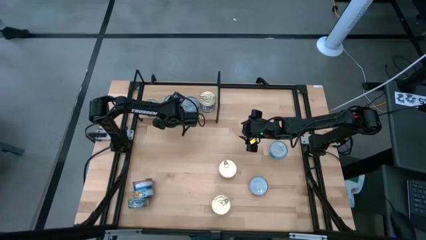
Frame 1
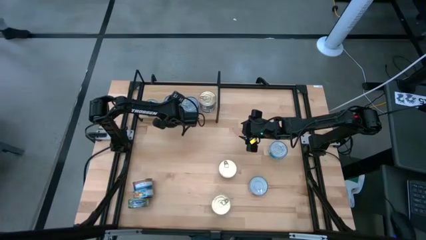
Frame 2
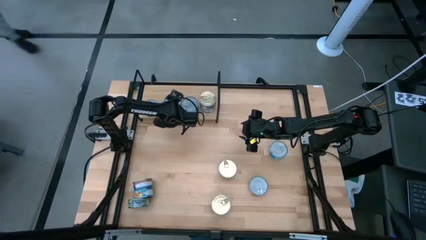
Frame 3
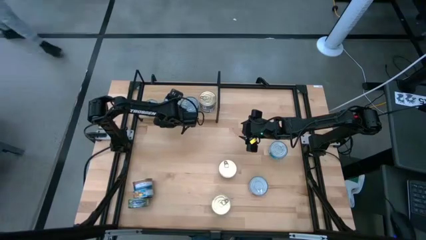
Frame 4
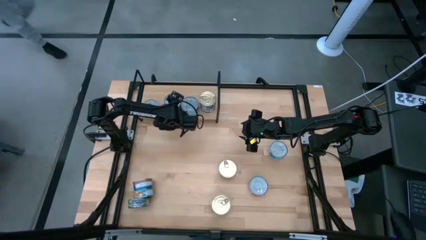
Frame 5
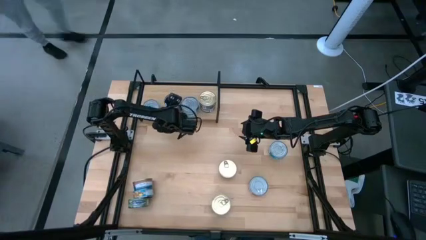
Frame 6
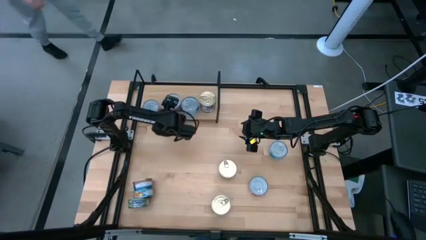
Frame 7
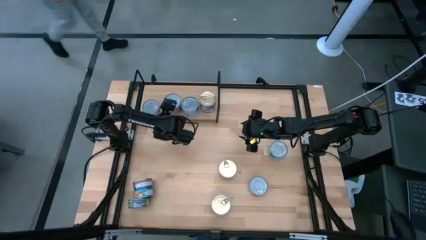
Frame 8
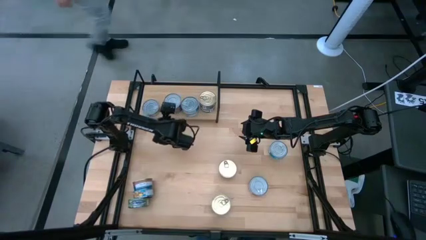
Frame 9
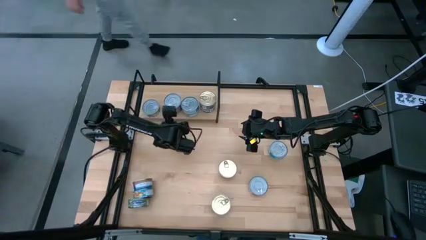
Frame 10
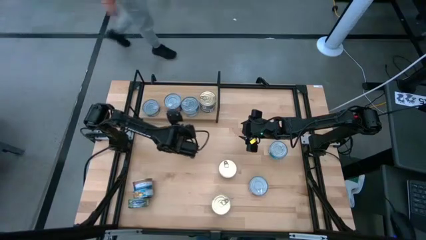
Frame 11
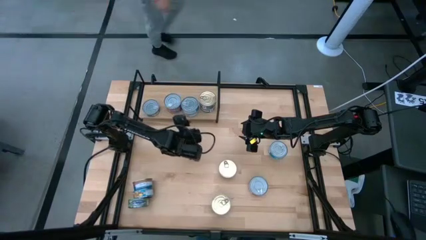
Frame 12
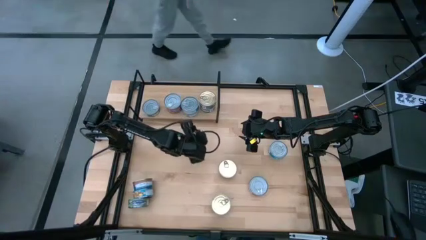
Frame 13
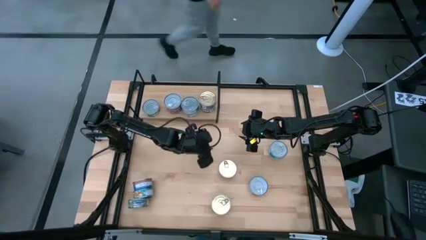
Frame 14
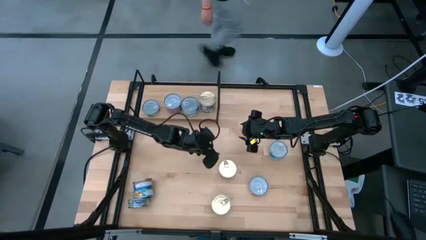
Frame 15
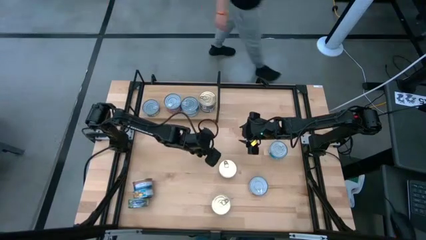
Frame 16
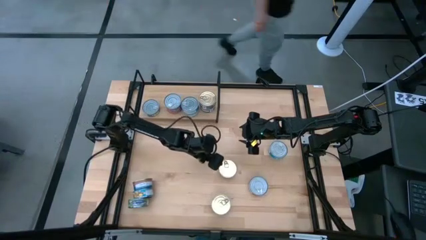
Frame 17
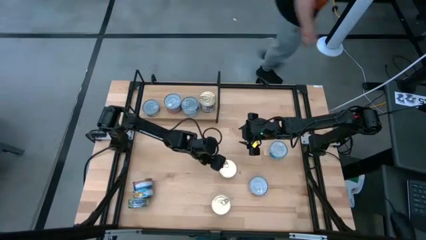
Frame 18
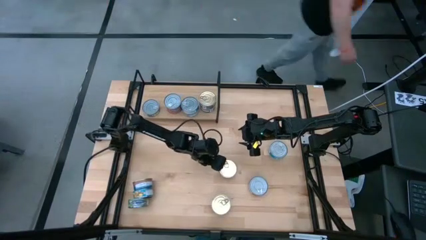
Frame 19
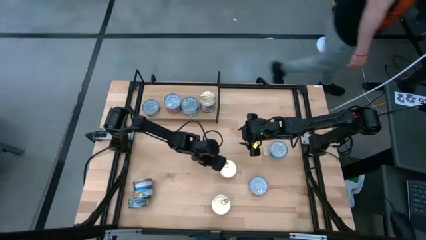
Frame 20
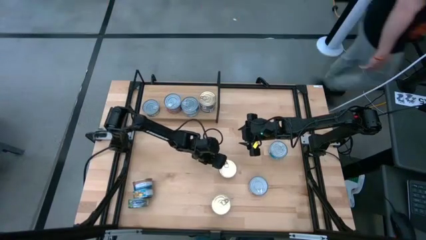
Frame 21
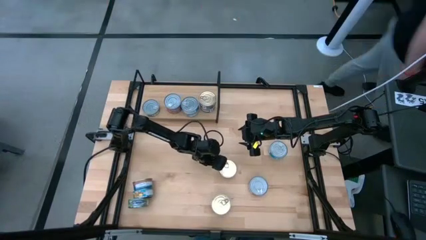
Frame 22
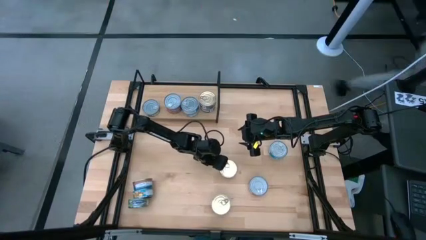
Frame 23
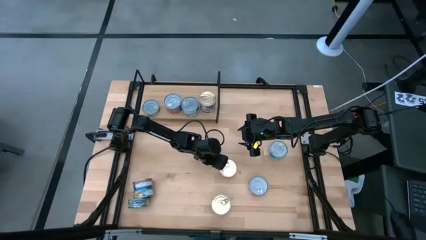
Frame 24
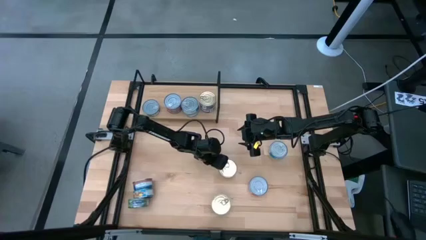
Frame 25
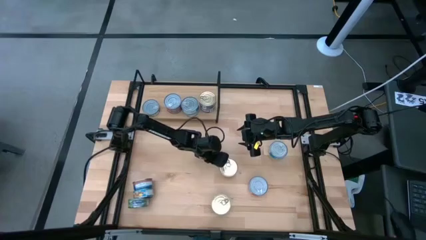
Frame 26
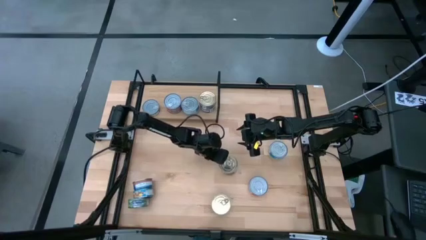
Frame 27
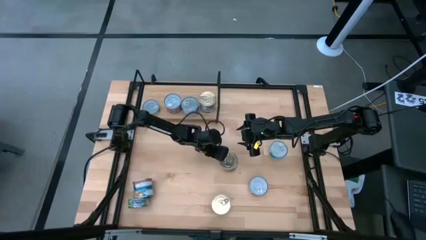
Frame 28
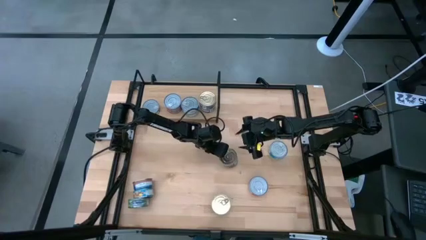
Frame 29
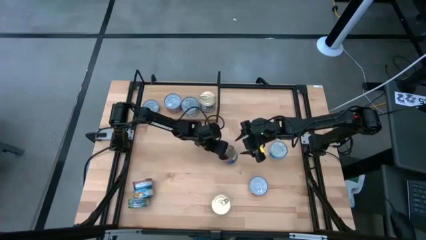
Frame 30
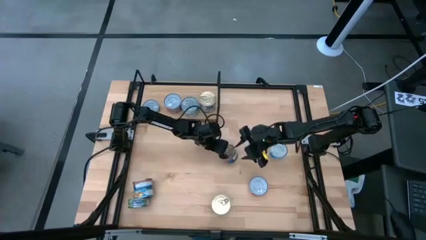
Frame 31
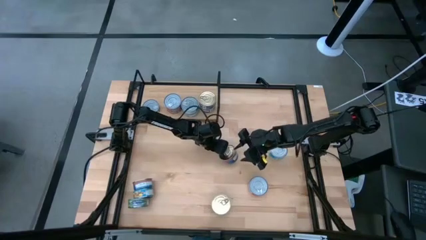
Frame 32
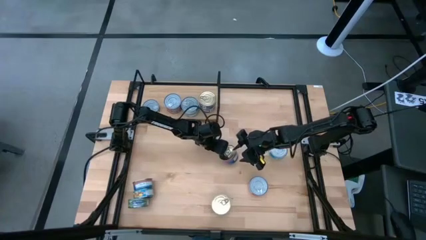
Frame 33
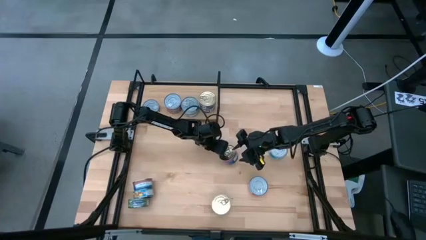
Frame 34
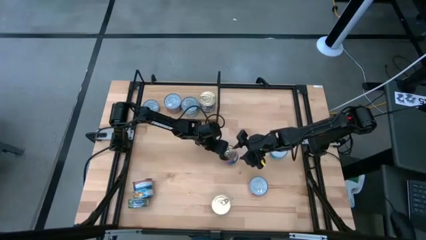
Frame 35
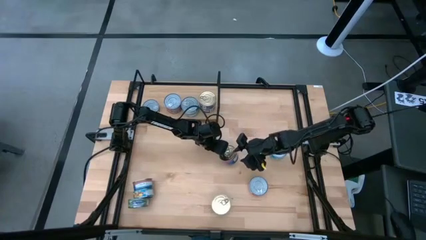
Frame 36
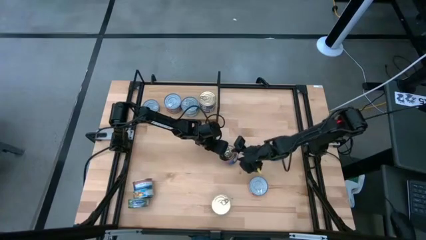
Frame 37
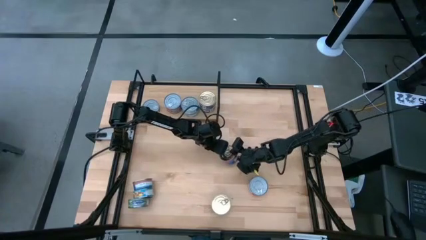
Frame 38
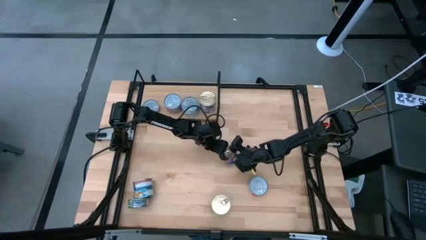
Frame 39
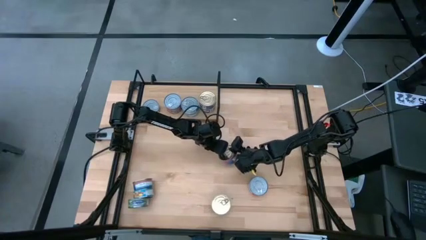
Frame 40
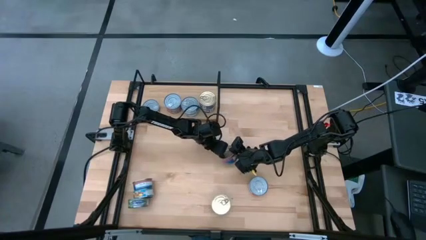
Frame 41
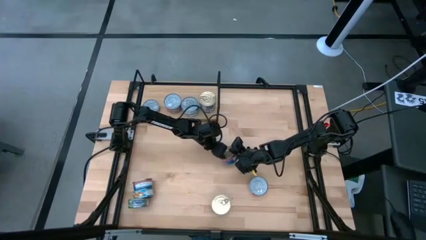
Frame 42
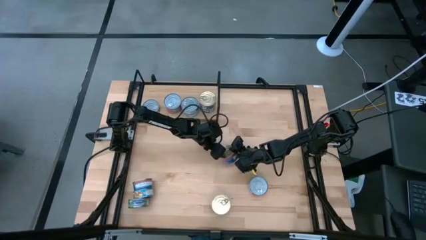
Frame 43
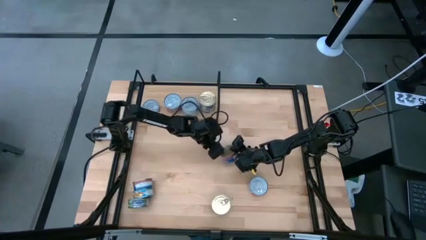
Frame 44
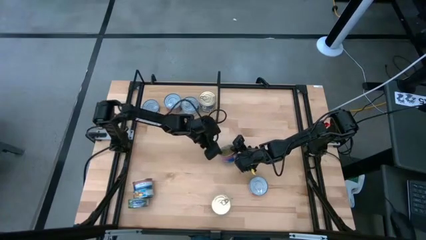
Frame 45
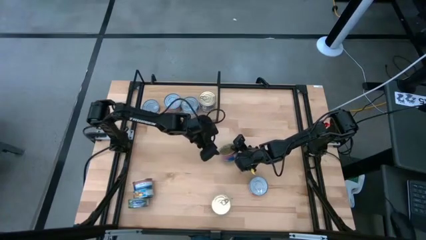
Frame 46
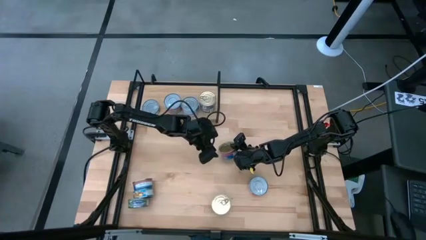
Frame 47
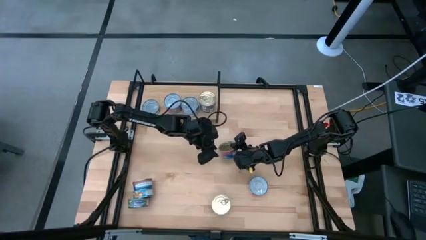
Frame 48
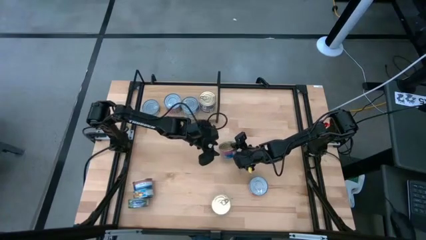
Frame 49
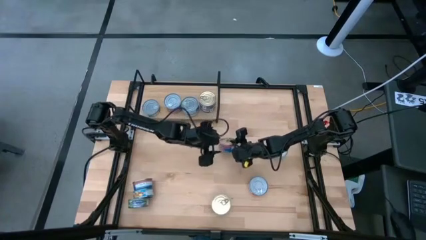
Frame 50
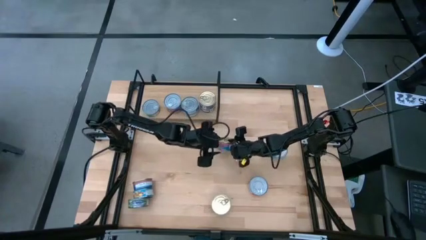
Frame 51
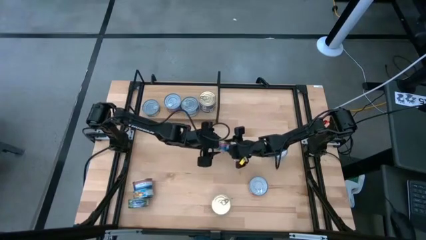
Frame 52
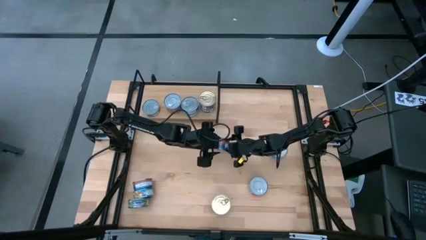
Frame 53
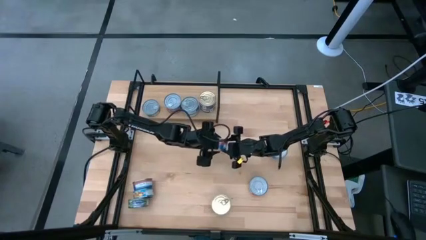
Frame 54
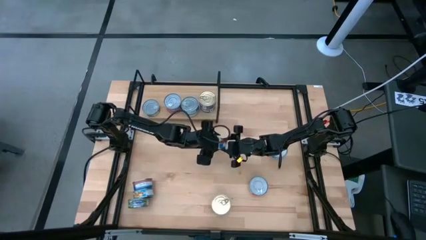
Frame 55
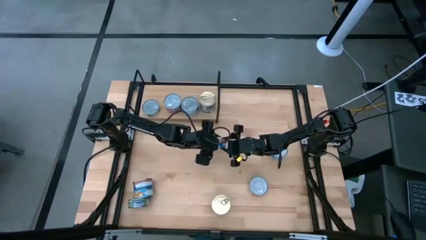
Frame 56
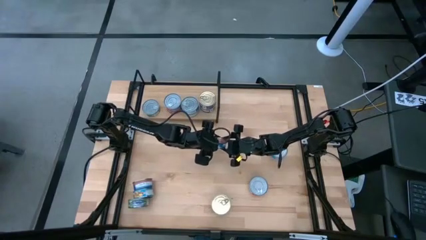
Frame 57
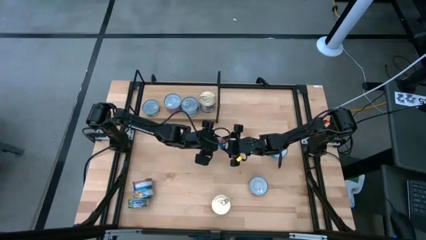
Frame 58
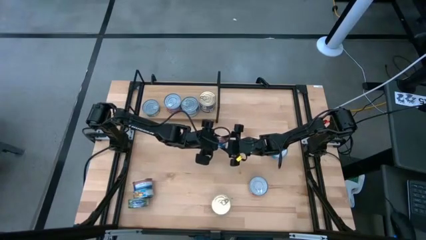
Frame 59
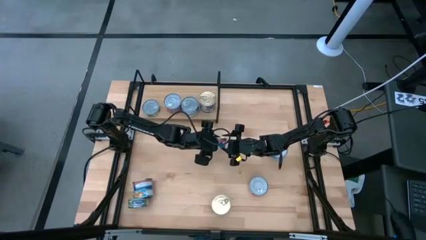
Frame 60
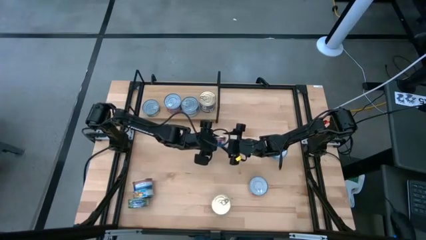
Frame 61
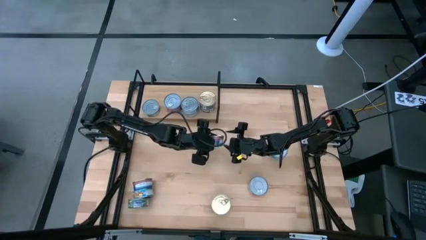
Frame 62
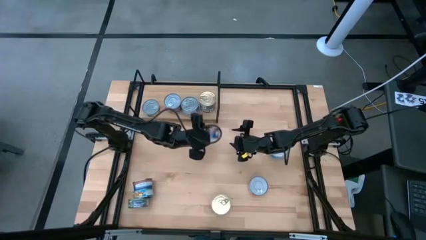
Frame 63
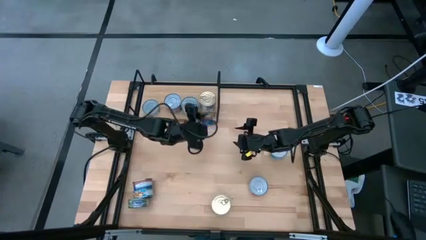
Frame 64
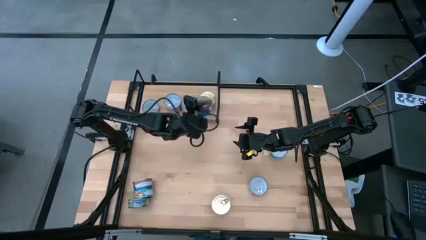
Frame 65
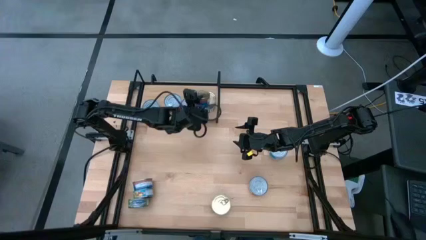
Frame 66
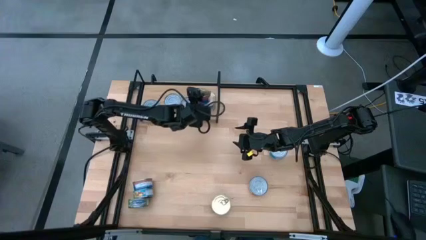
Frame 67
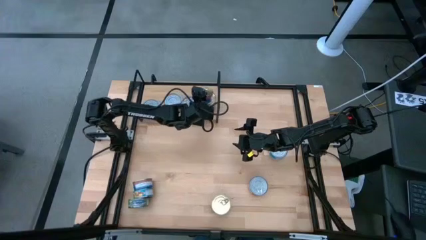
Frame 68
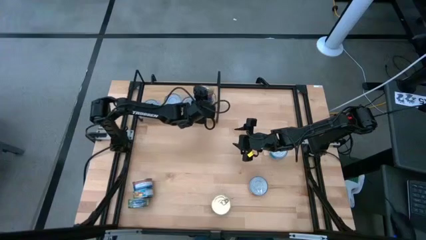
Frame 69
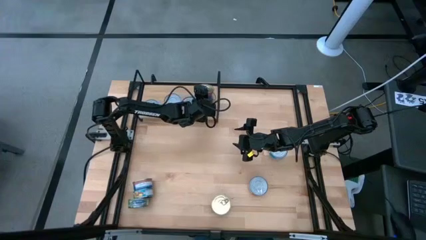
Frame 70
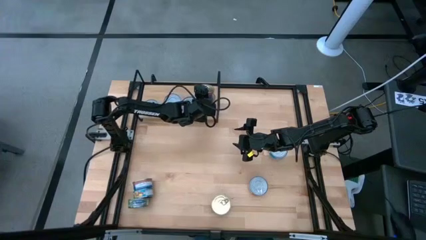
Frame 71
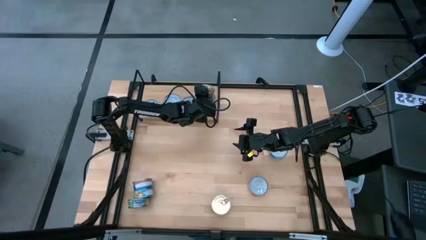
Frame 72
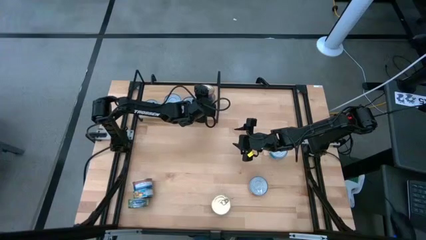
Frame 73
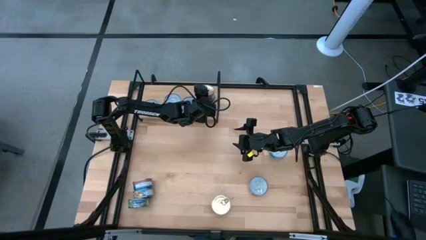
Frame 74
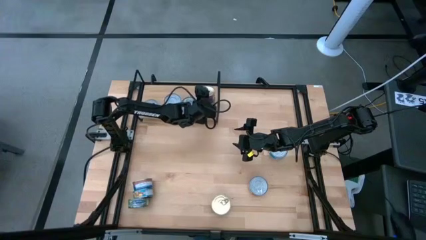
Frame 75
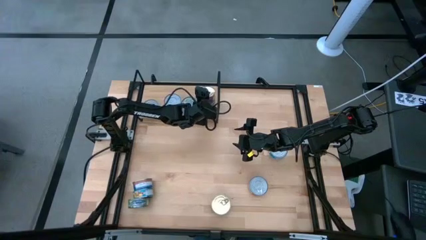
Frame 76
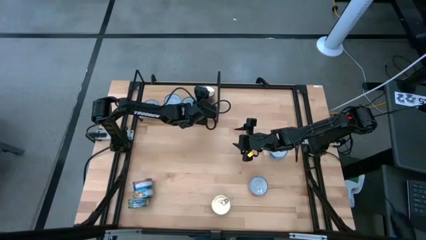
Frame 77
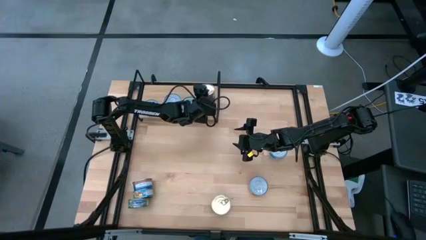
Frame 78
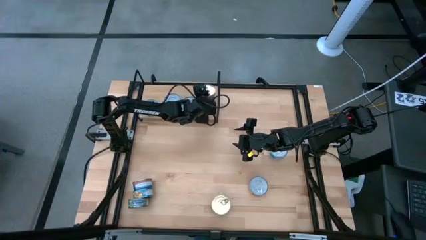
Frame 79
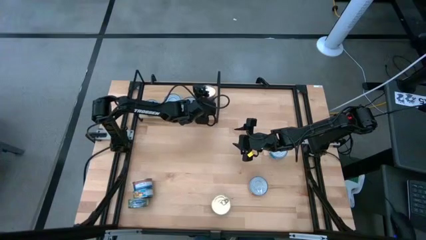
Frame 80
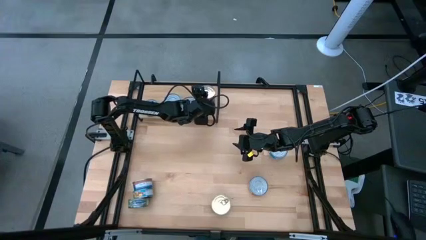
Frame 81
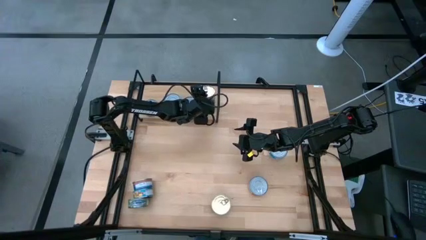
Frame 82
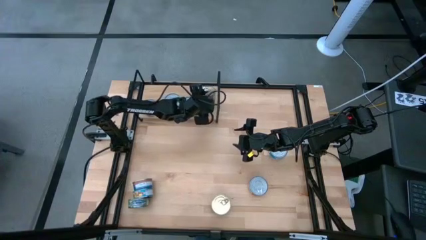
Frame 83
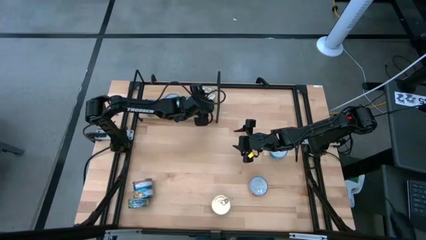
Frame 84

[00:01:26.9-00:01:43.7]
Task: Stack canned seafood by type on shelf
Stack the blue pink tuna can on top of the blue pink tuna can on the shelf
